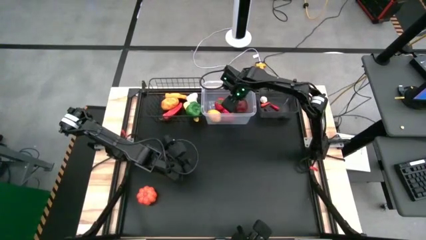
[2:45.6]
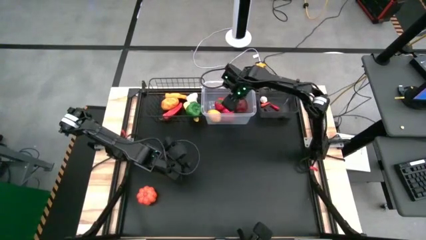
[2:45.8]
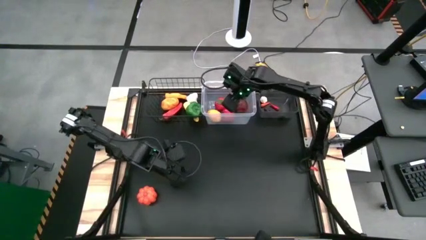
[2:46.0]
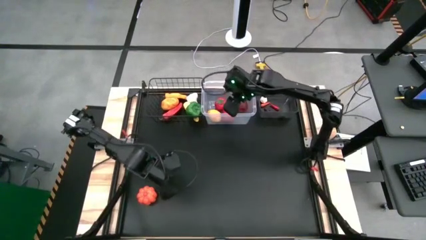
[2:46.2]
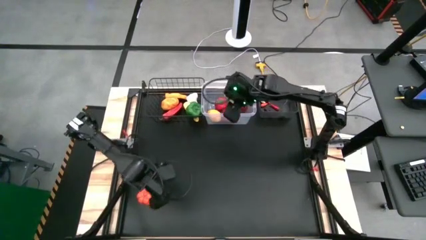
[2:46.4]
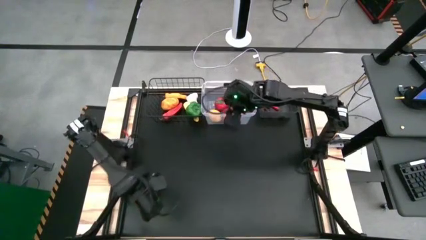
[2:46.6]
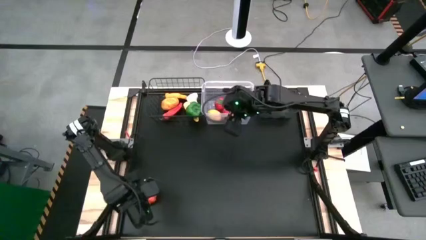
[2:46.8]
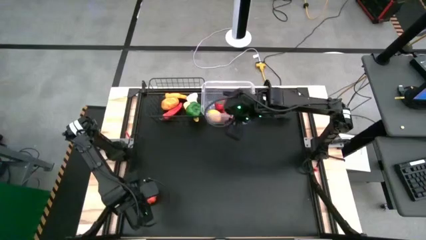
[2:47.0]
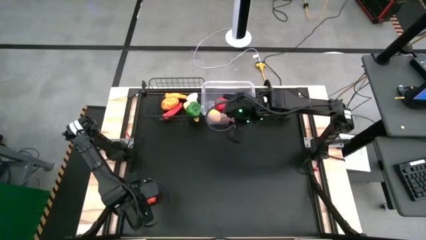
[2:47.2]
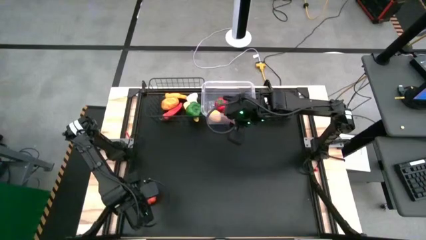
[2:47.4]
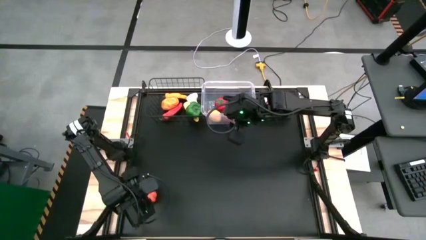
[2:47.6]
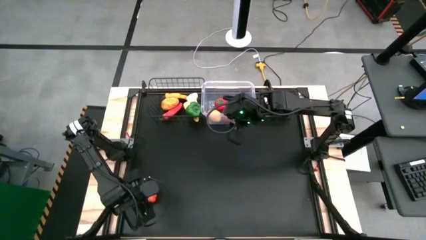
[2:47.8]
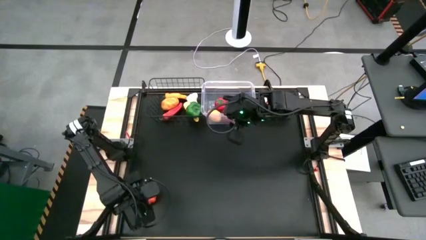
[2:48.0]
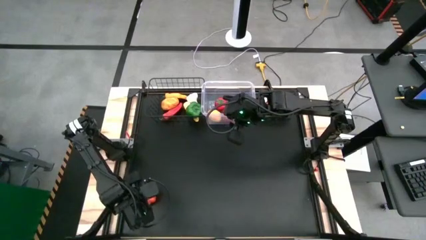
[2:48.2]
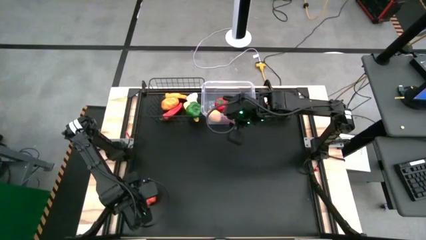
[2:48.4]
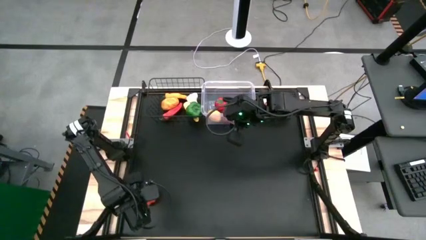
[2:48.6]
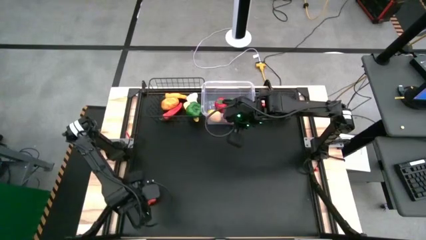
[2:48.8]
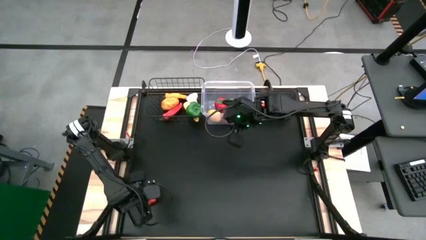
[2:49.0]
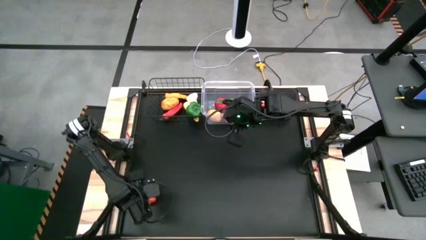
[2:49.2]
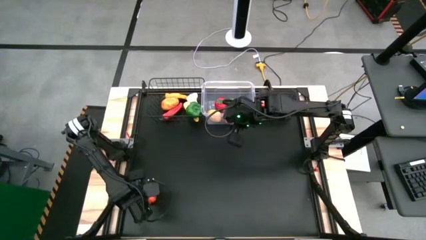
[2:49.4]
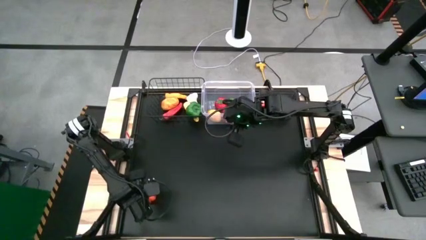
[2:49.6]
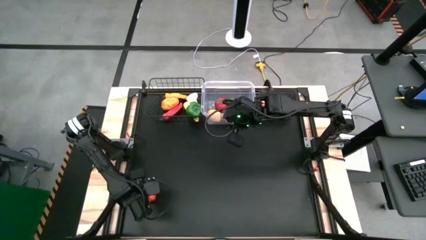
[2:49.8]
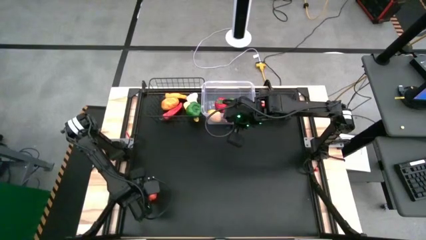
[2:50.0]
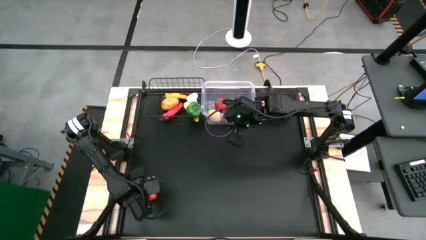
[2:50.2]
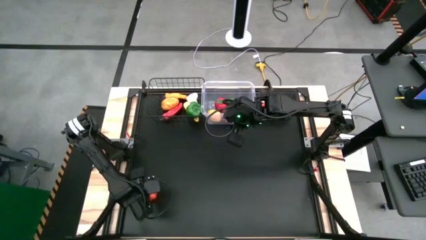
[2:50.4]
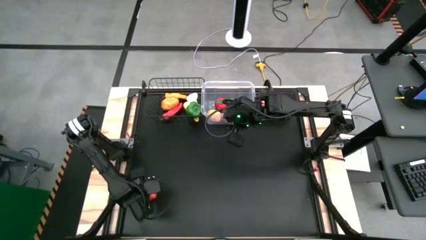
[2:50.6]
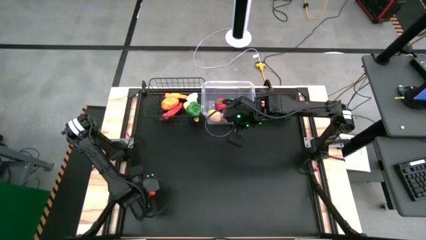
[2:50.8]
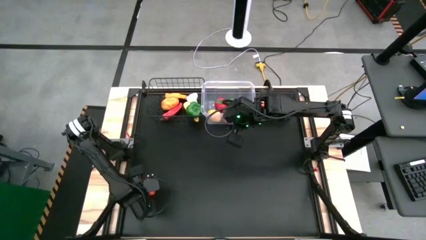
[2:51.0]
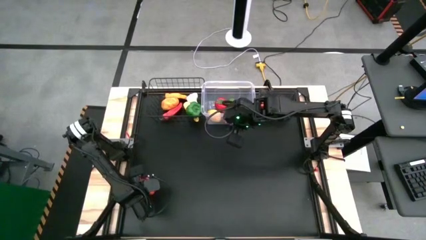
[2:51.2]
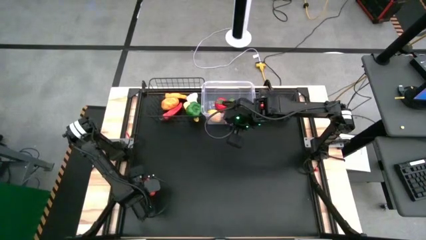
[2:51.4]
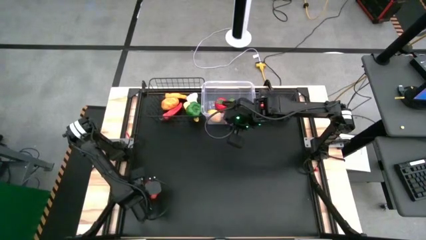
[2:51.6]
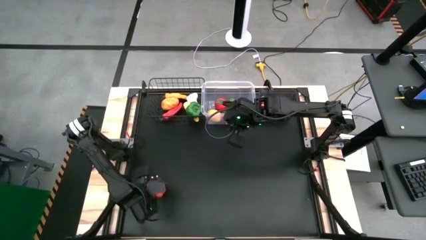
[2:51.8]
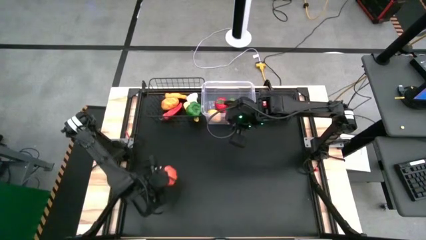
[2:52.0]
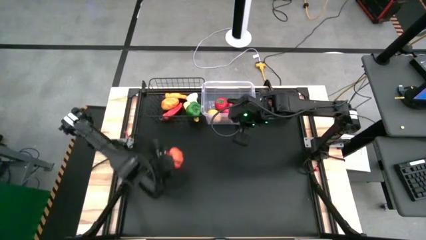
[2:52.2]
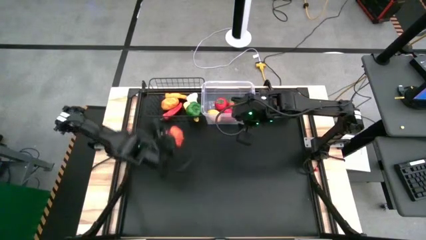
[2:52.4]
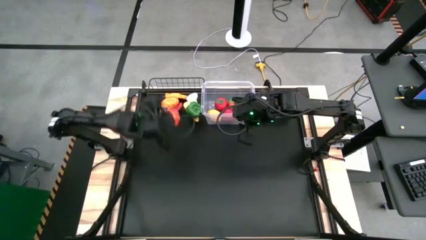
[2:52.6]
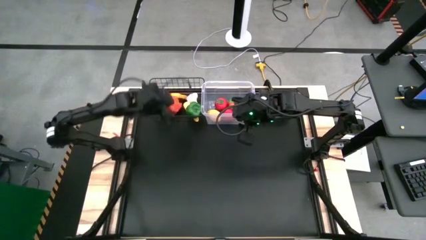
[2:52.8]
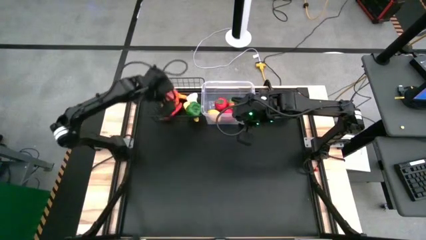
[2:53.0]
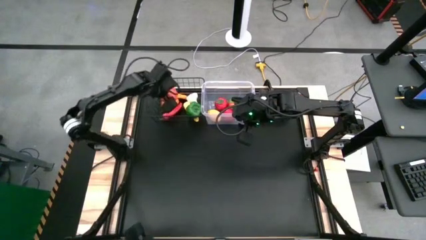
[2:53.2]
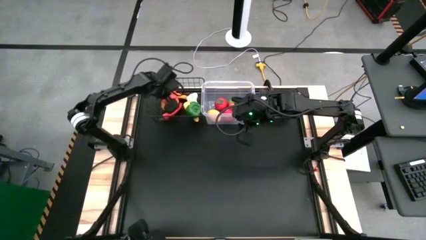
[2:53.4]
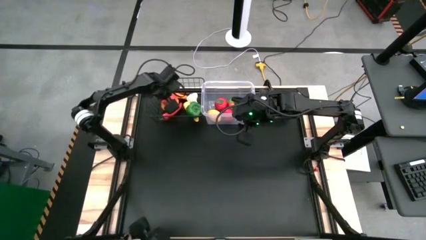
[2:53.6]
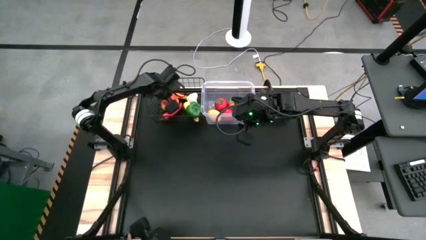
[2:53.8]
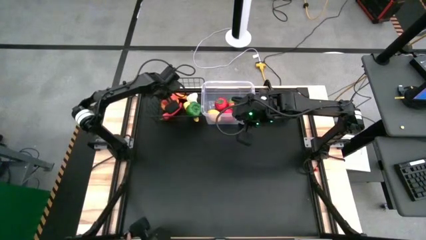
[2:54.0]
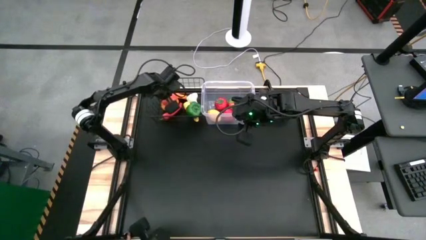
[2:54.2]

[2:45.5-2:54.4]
Task: Sort produce into baskets
Put the pumpkin into the wire basket

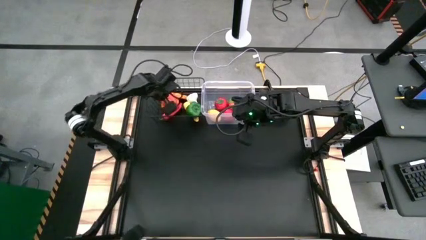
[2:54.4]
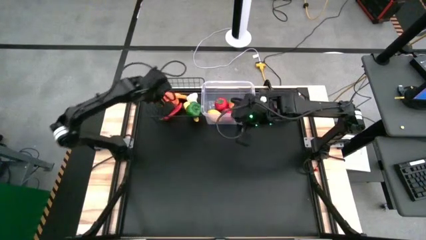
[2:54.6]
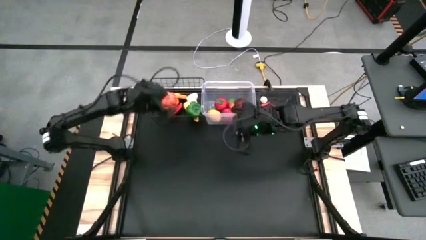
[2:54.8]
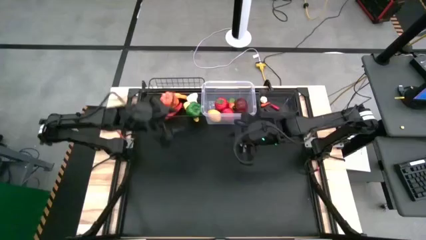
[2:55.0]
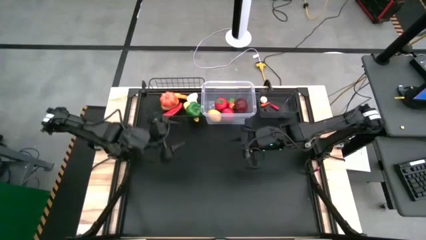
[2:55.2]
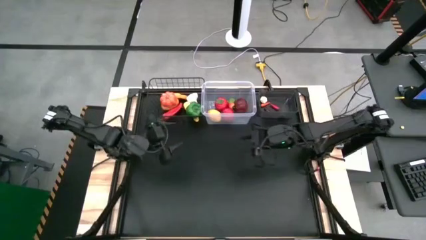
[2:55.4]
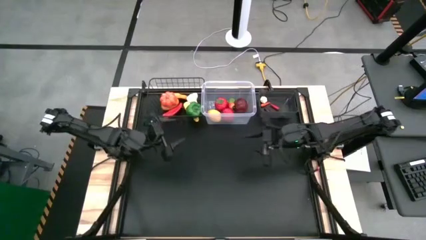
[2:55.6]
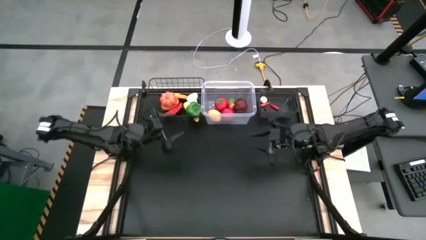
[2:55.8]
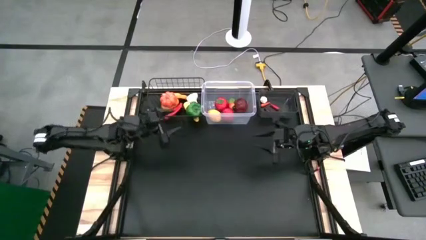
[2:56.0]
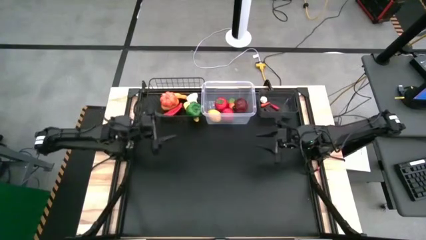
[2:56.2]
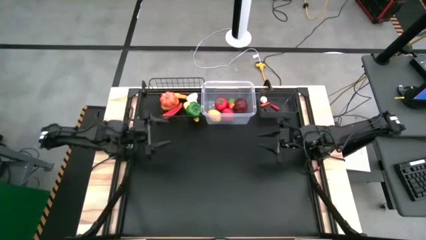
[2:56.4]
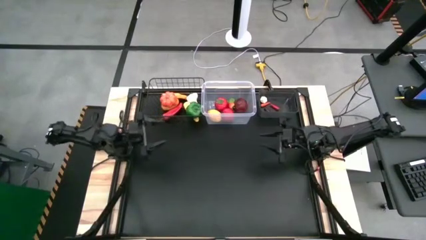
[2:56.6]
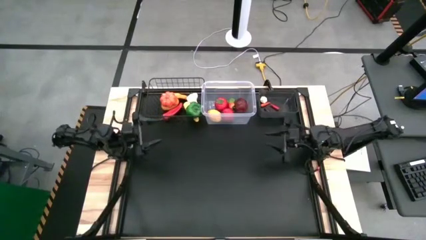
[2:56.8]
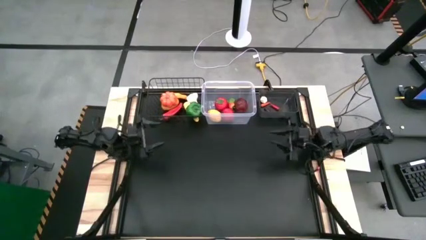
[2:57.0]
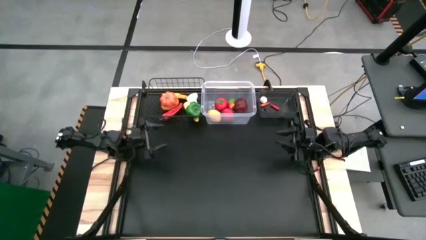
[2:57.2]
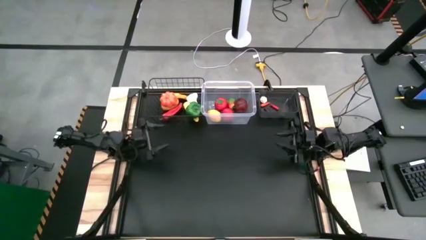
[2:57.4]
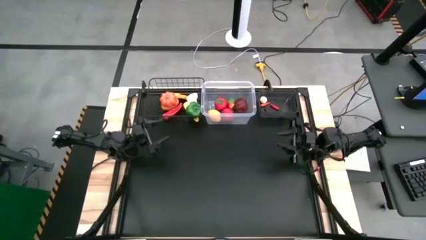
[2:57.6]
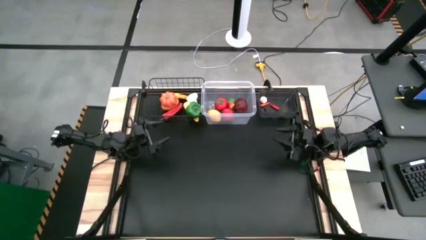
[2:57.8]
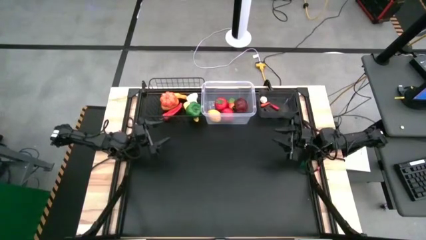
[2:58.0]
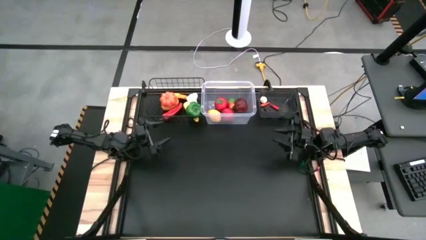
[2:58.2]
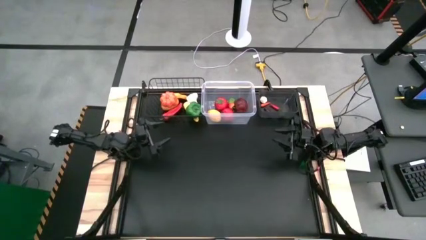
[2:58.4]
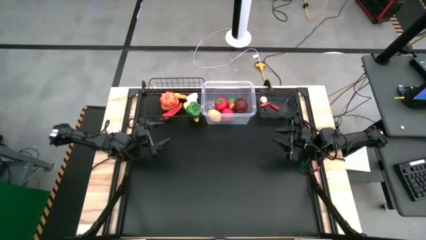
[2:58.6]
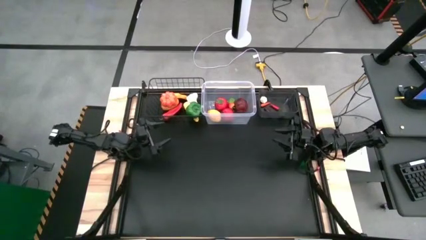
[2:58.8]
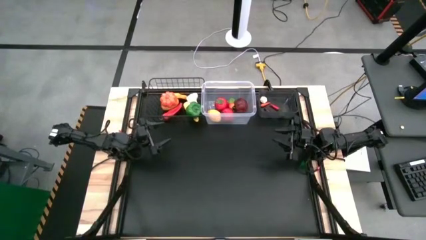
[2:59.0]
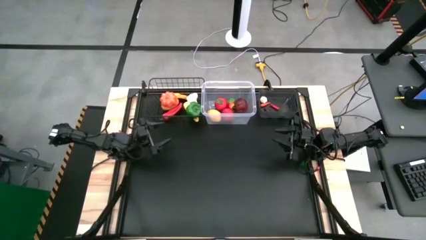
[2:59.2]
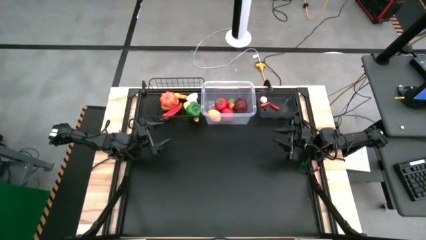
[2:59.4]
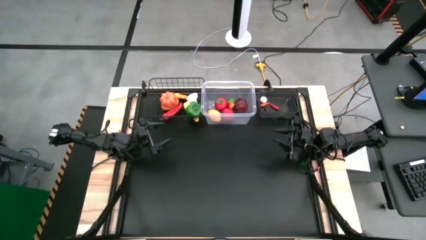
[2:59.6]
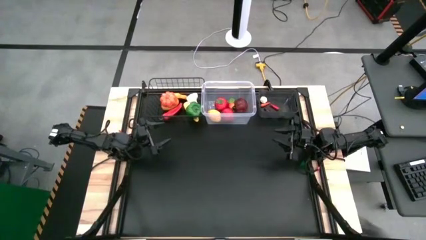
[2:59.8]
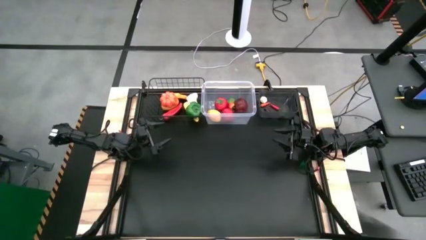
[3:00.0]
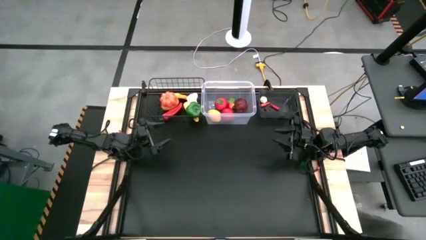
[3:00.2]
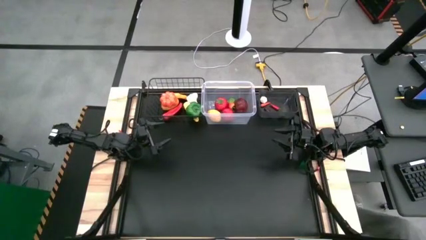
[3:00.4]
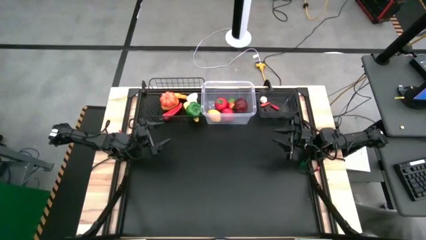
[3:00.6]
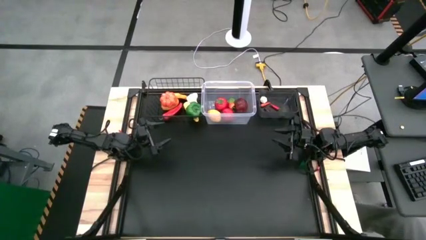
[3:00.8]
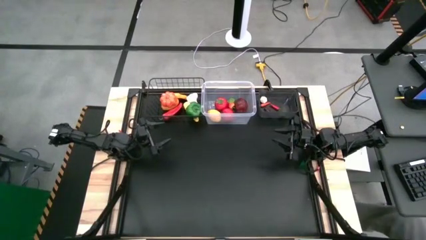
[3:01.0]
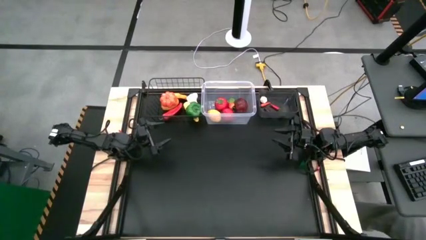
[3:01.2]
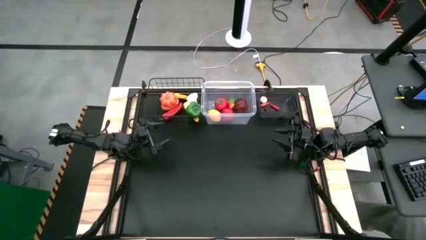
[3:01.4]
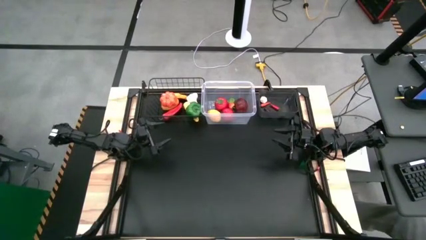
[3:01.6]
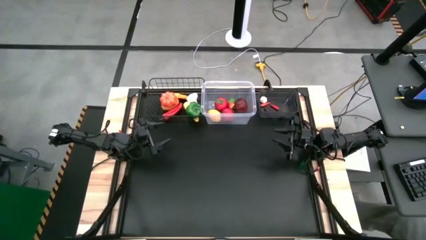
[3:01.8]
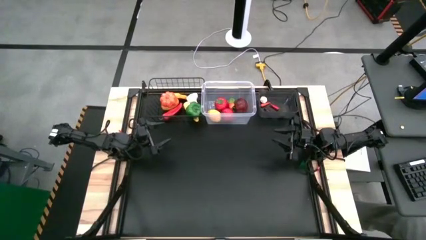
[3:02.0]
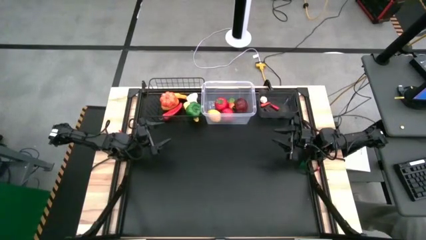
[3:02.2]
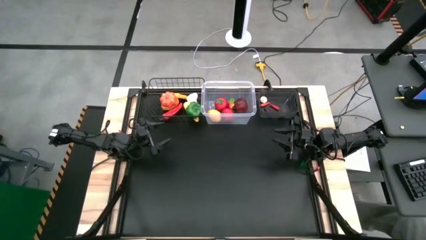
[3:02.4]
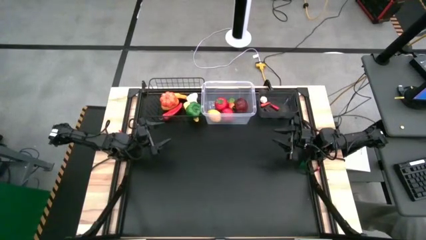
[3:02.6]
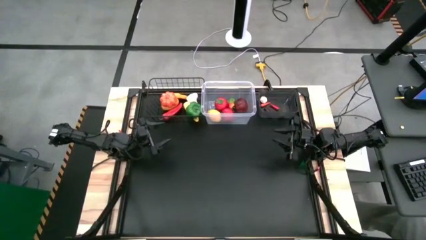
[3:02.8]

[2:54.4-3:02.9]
Return to Home Position
